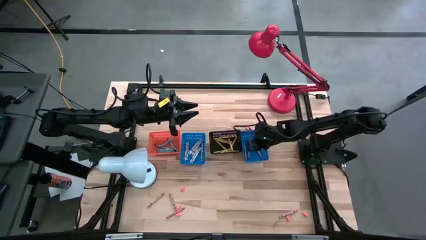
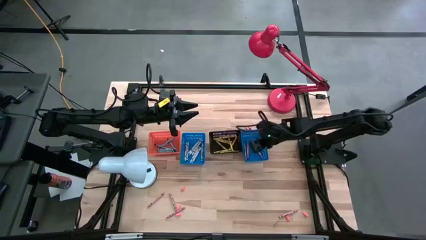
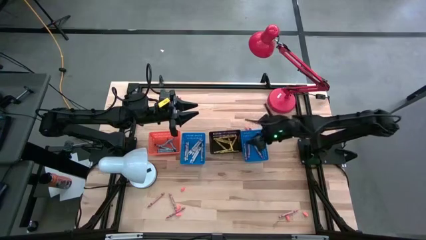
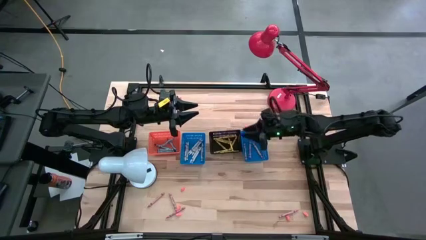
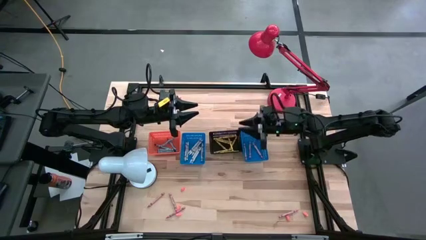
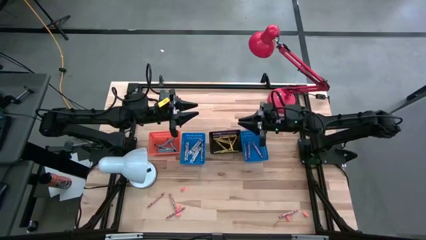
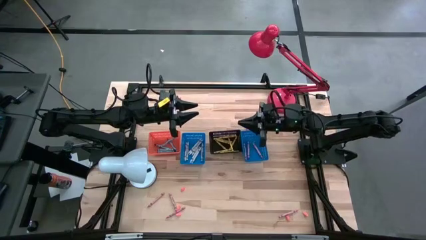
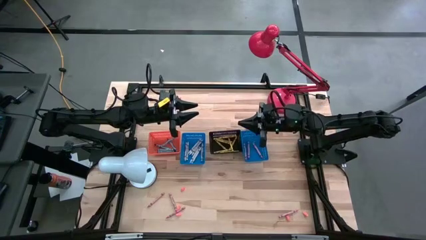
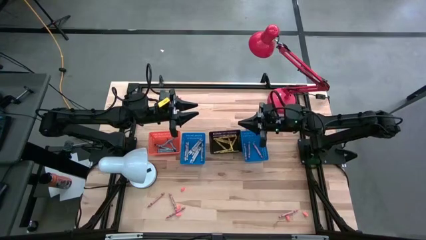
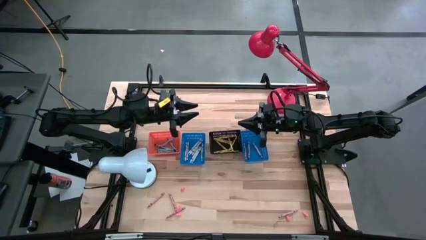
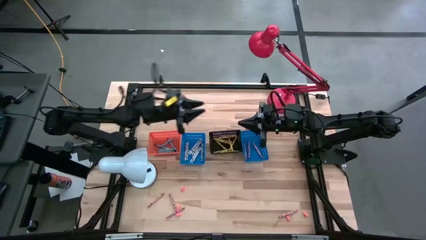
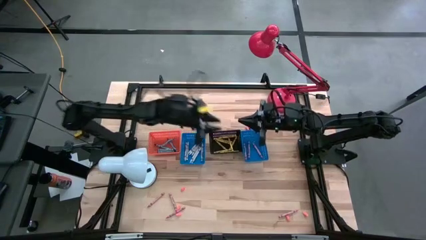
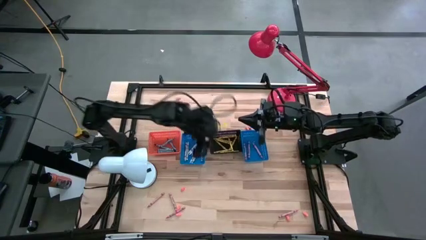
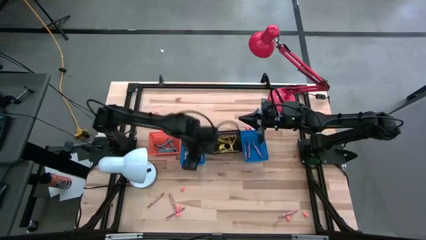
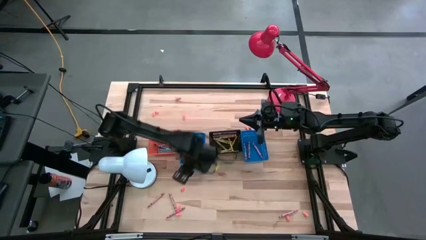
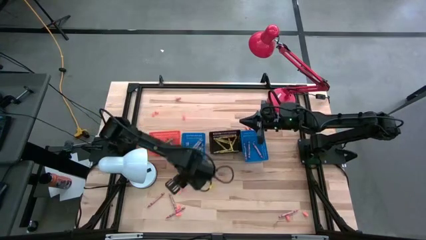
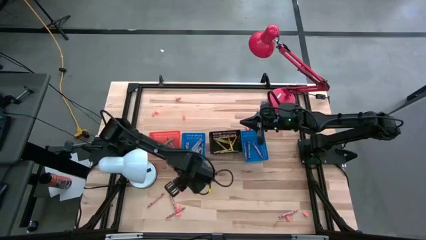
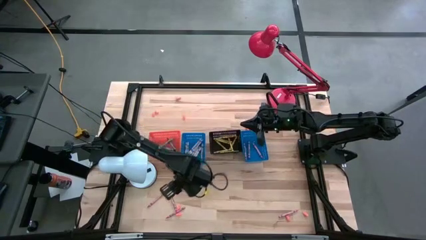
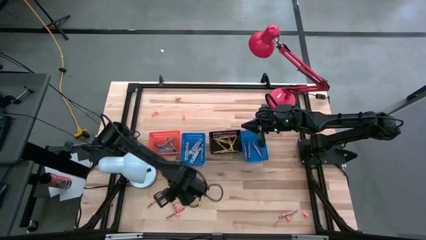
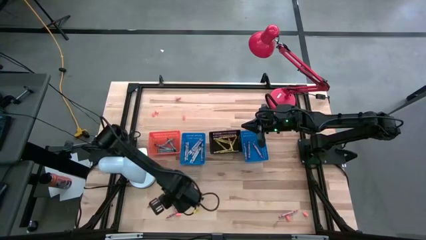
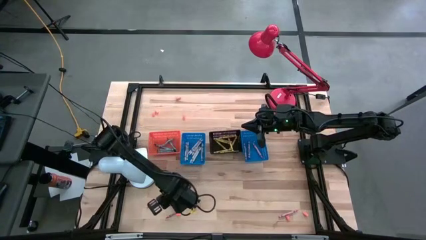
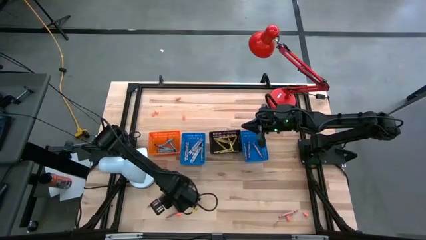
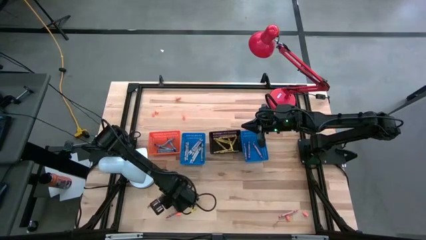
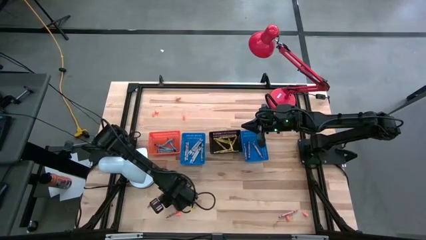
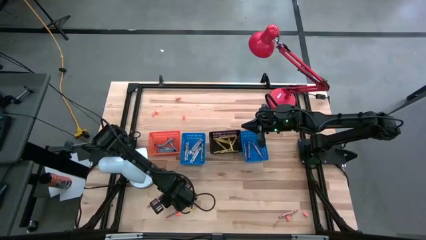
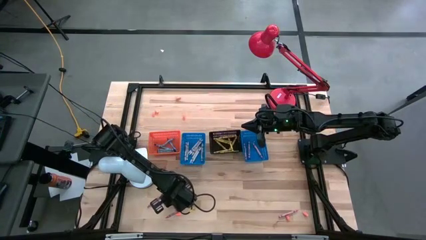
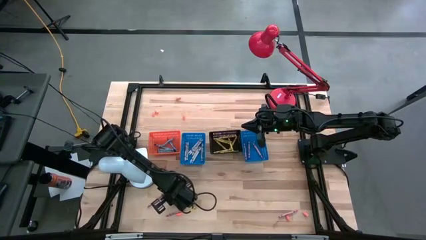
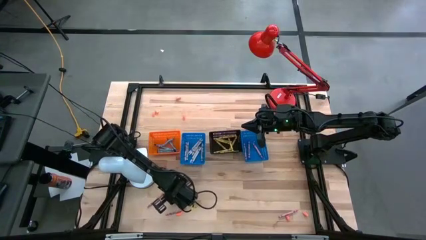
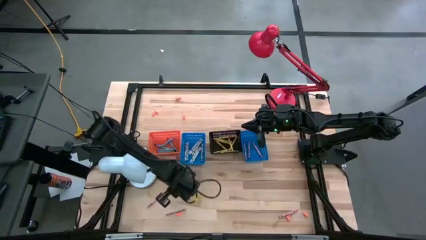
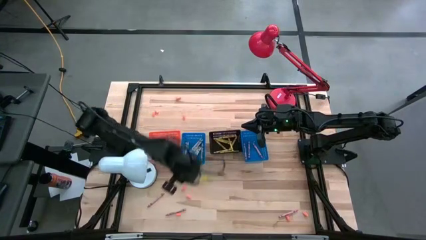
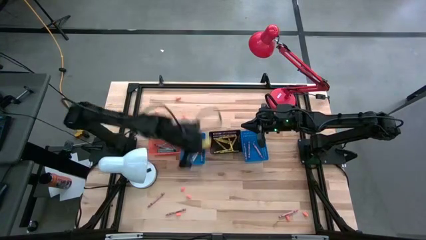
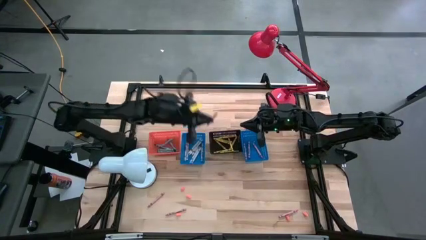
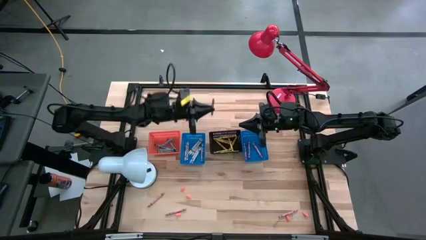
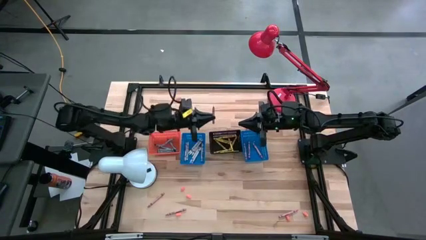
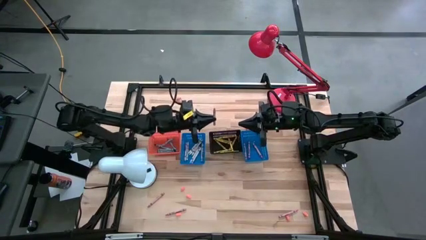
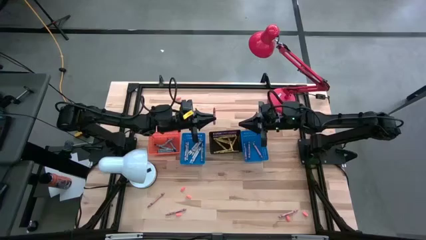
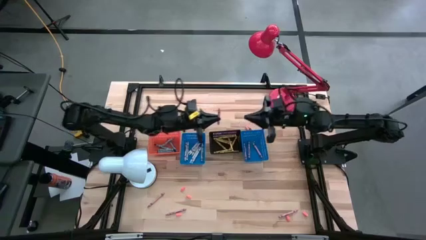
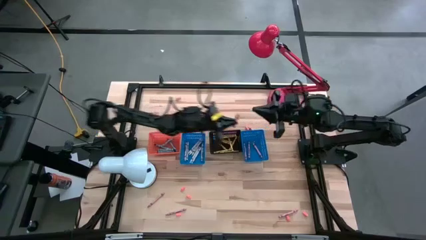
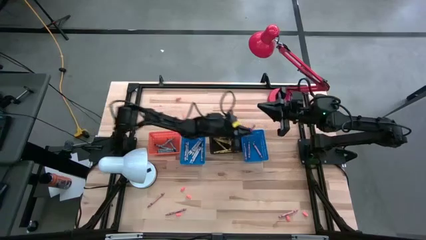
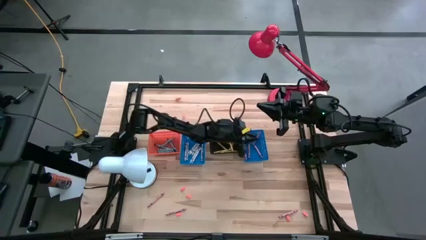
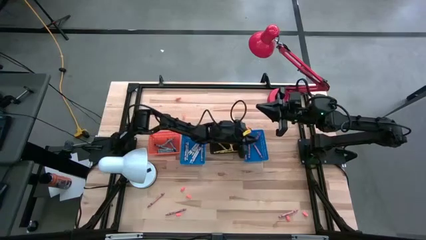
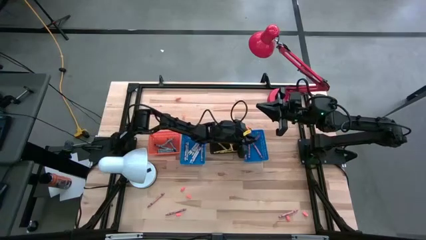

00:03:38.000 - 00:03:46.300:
Task: Sort crayons
Put the pink crayon into the right blue bin

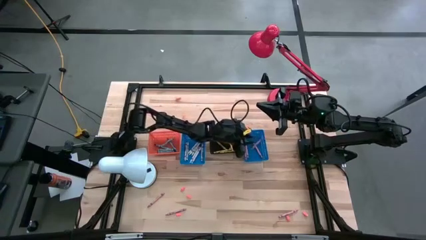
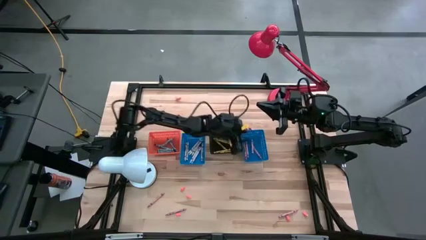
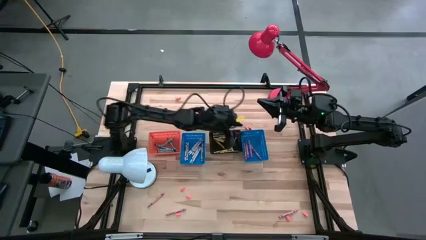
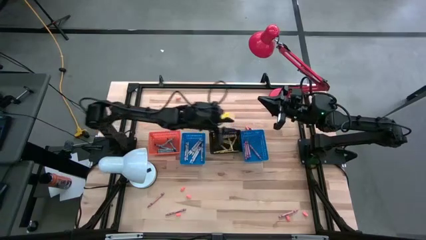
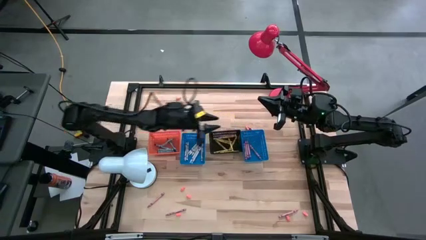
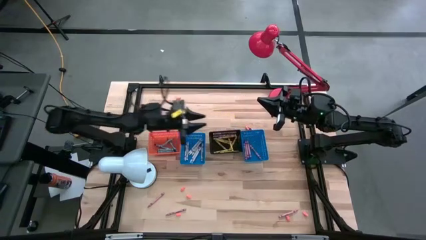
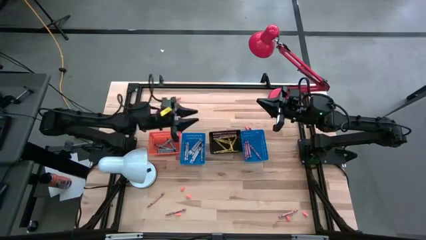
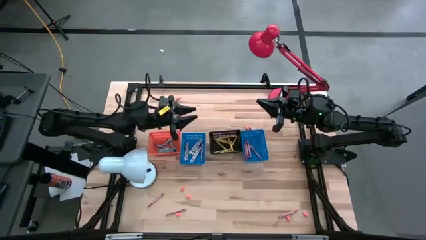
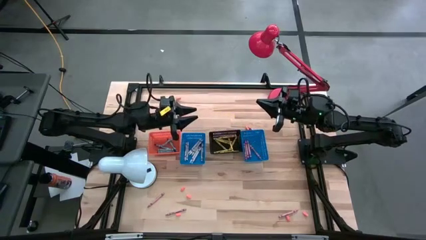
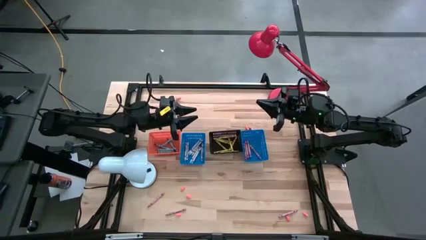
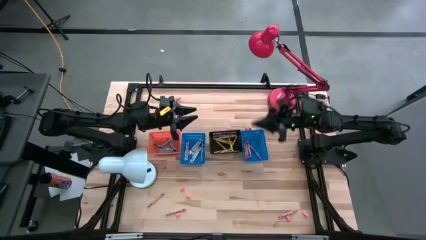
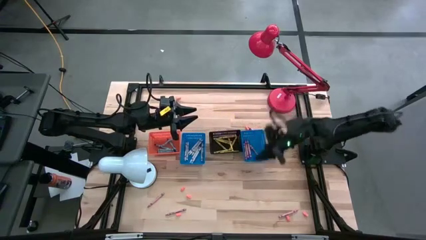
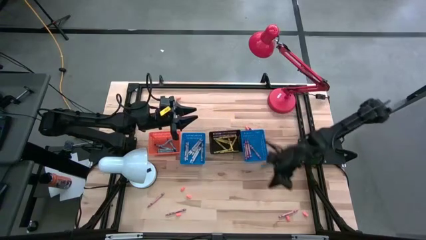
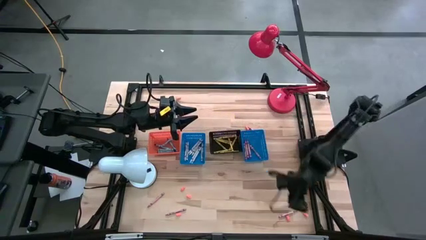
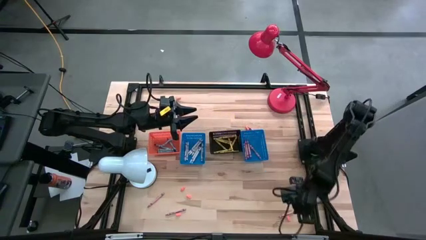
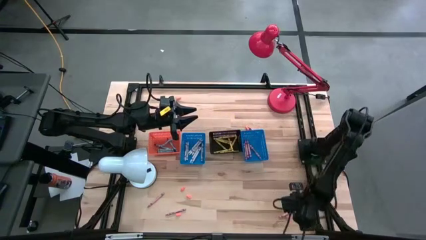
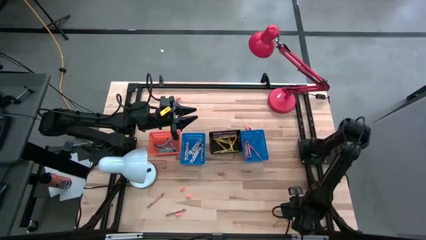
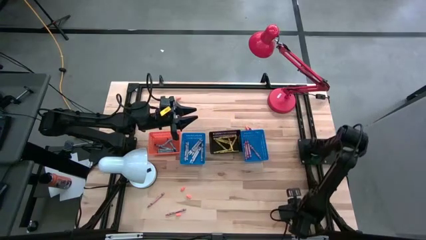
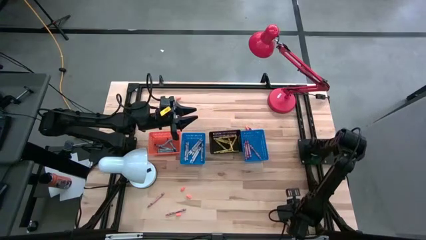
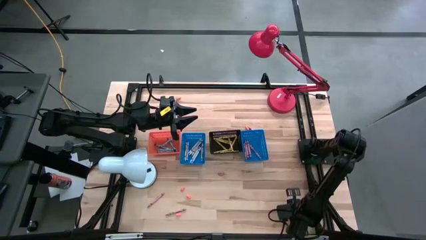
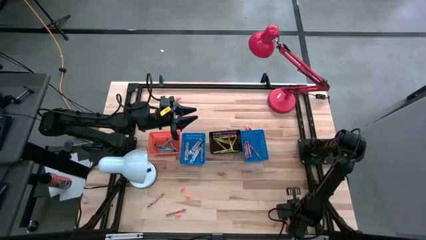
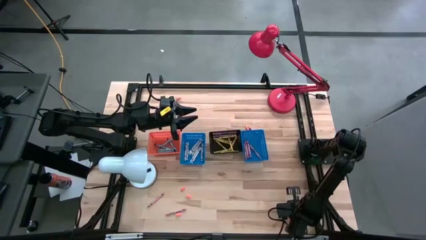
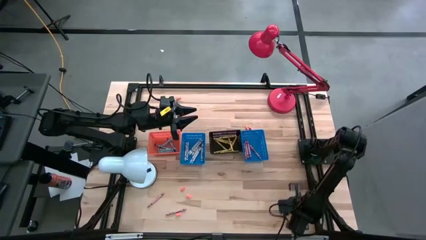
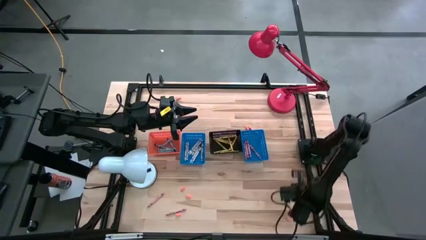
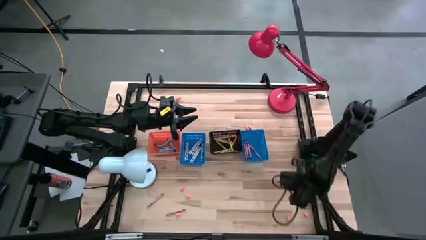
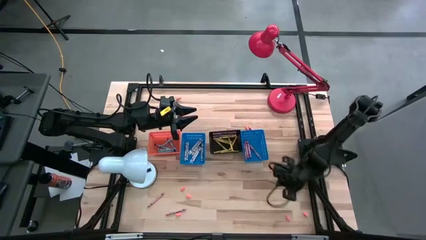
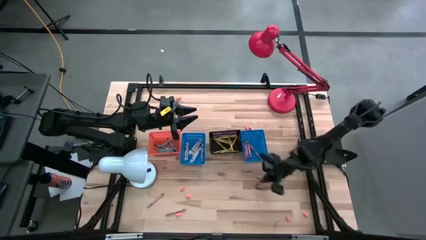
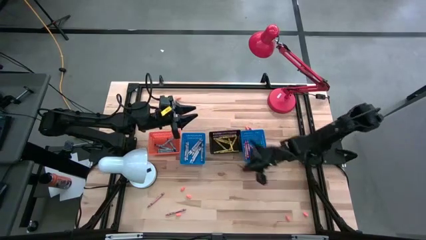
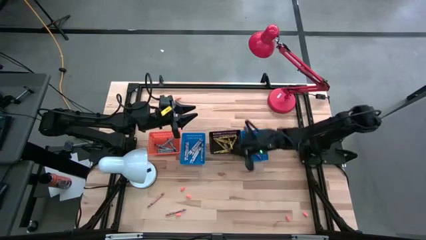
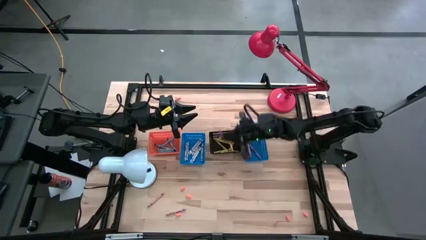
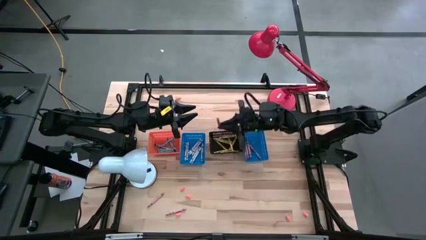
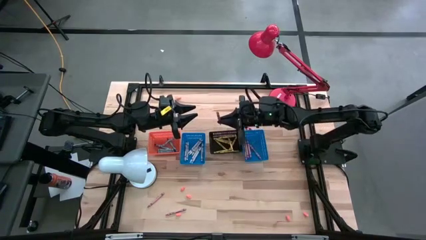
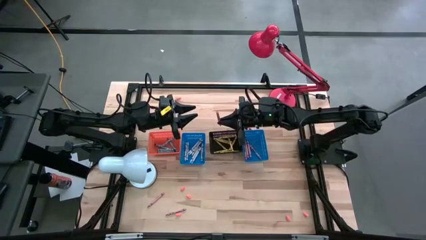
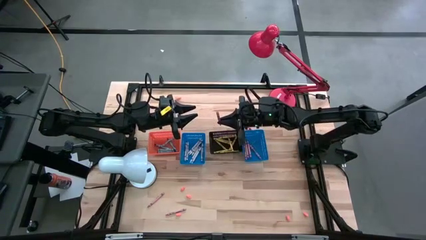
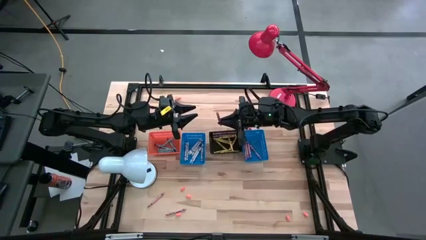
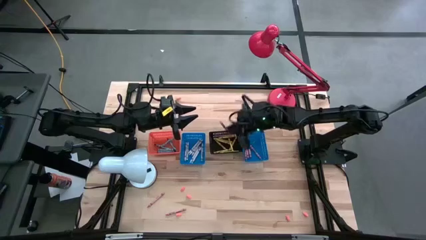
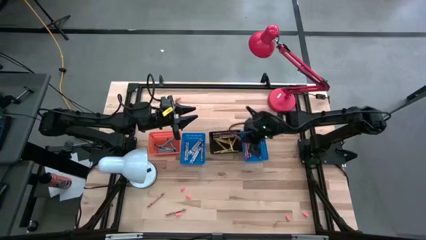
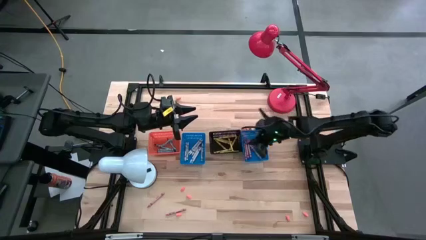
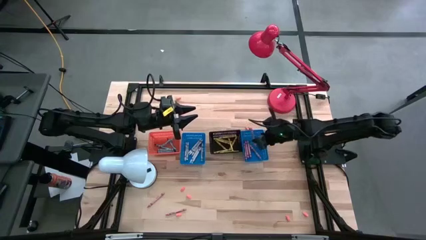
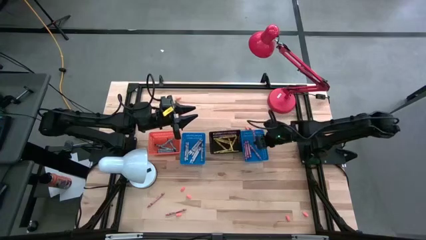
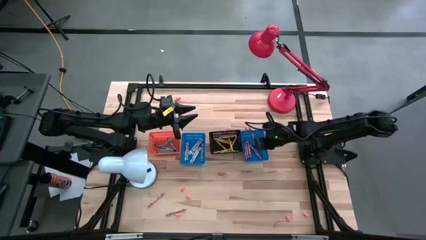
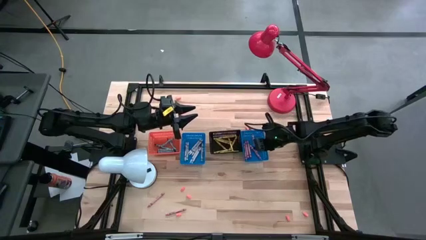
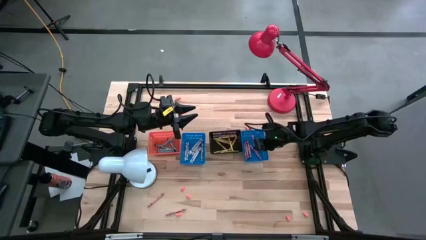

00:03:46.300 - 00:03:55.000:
Put the pink crayon into the right blue bin
